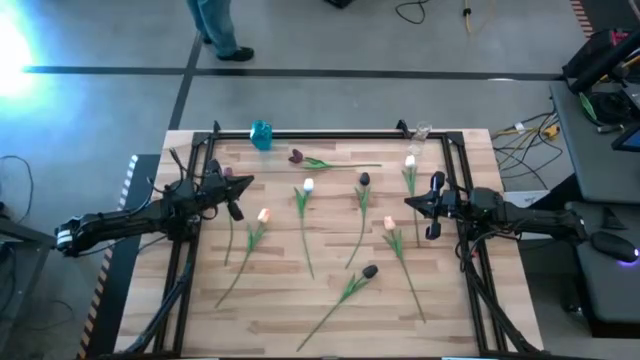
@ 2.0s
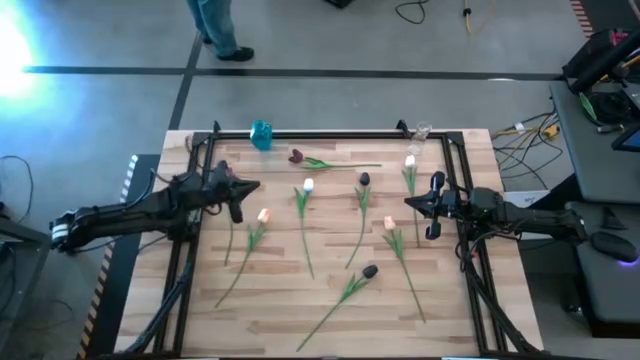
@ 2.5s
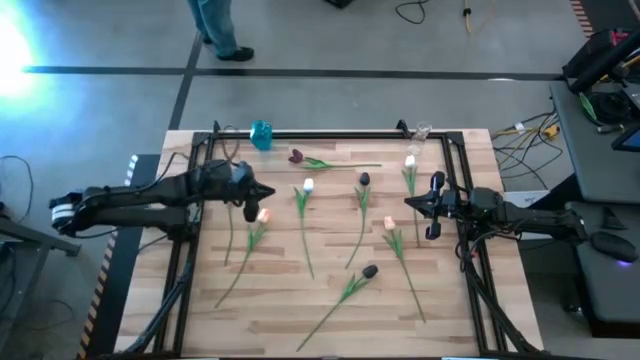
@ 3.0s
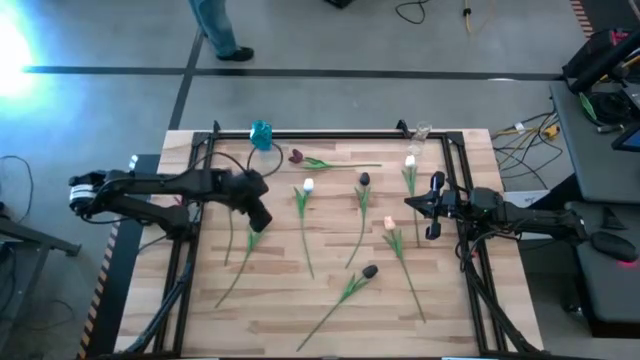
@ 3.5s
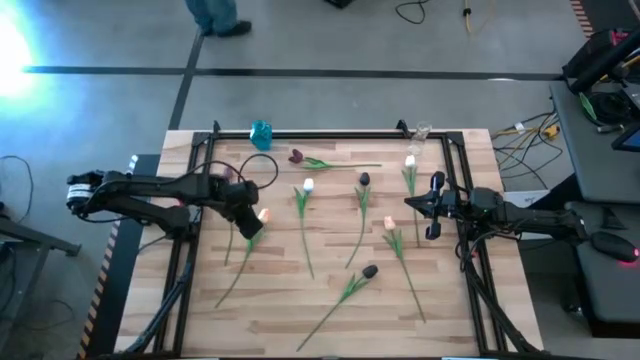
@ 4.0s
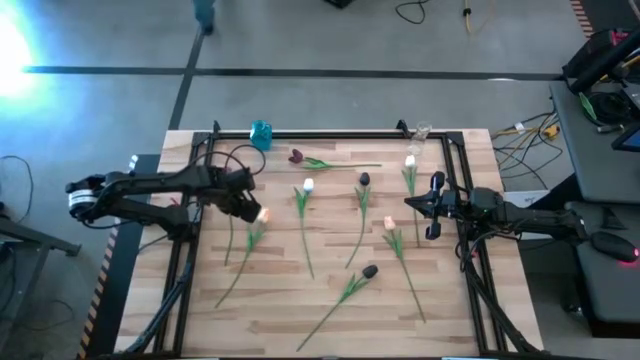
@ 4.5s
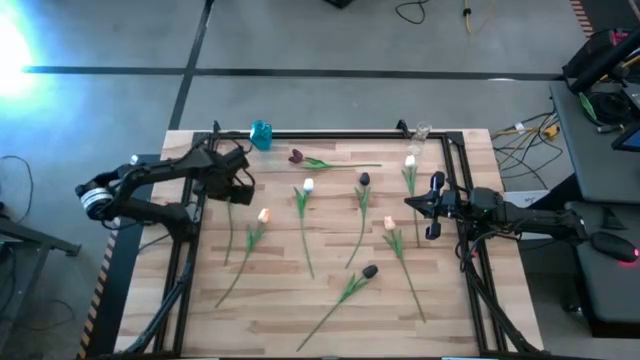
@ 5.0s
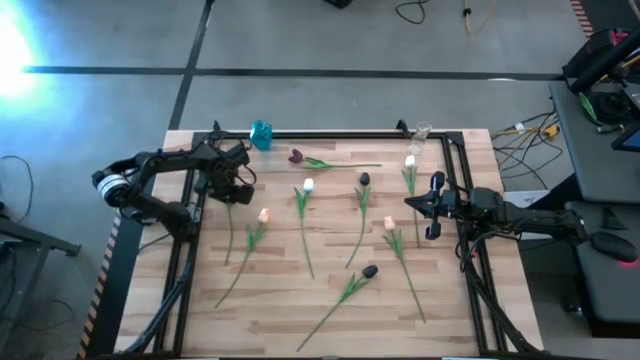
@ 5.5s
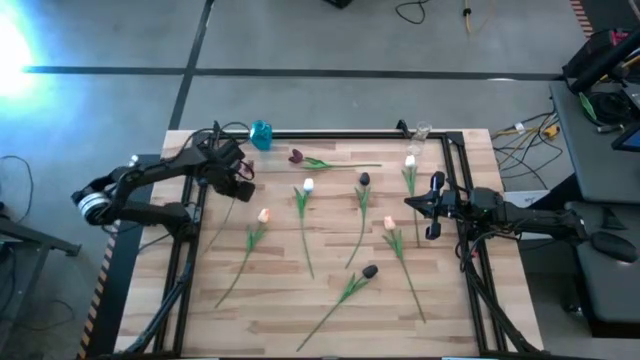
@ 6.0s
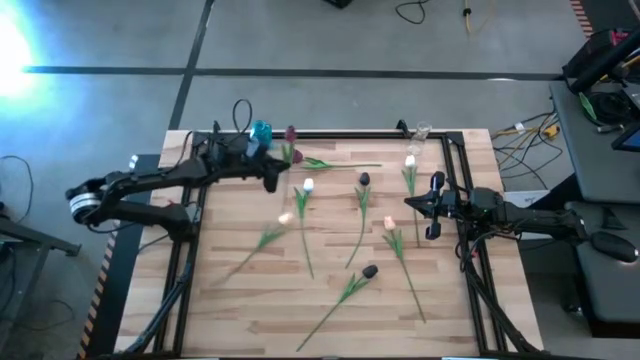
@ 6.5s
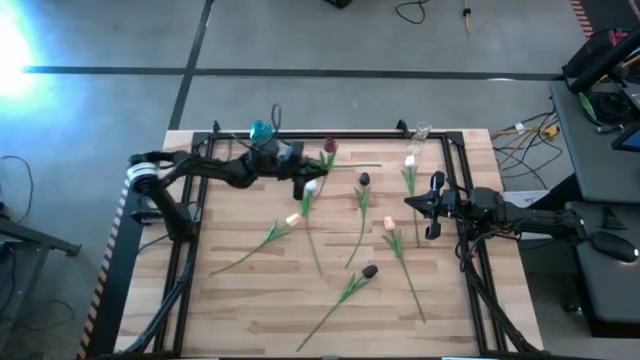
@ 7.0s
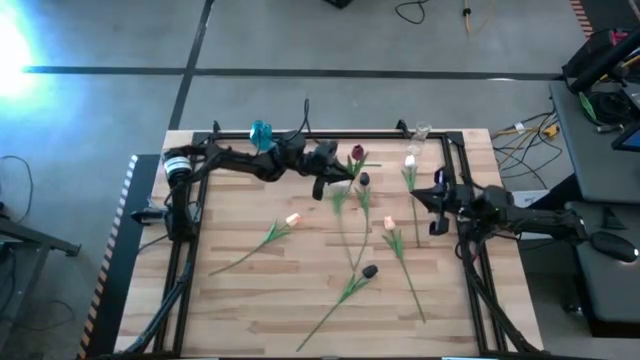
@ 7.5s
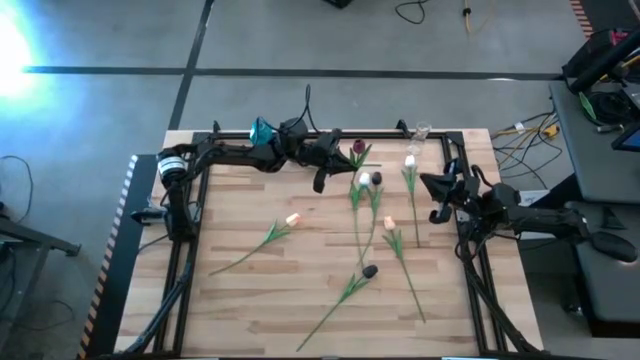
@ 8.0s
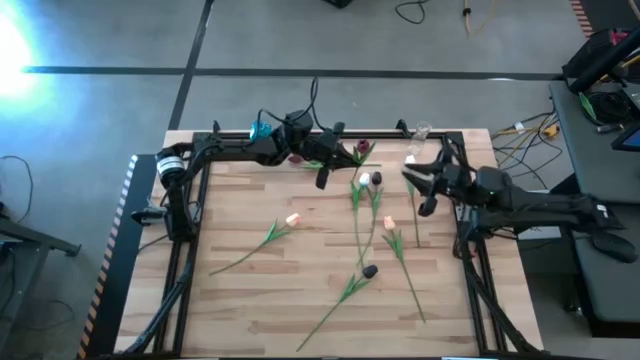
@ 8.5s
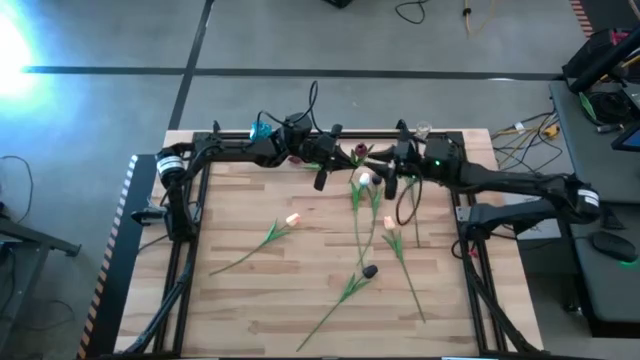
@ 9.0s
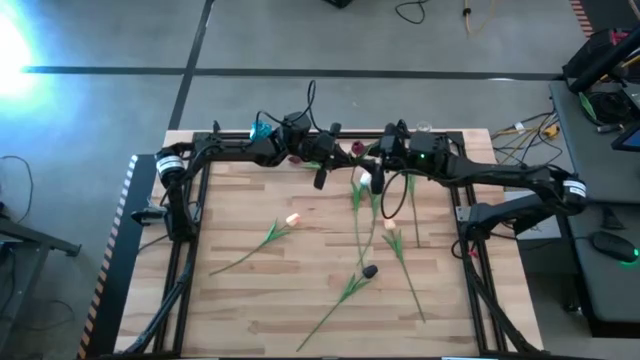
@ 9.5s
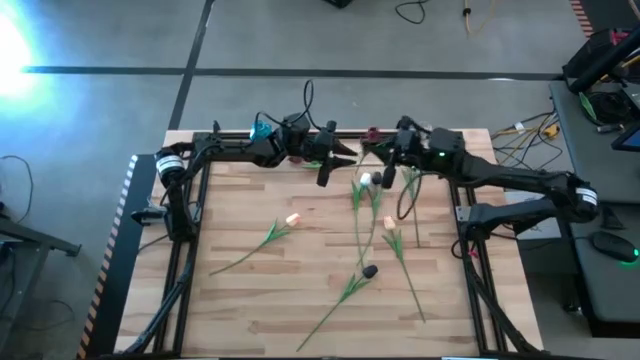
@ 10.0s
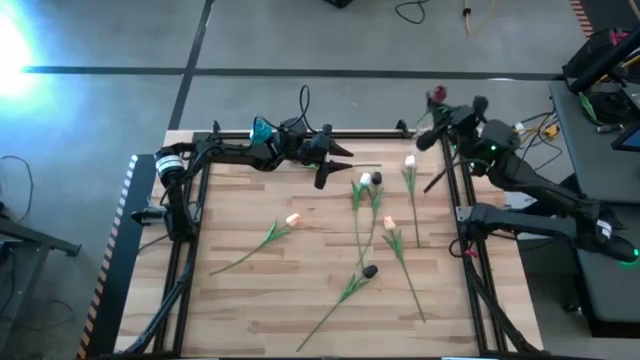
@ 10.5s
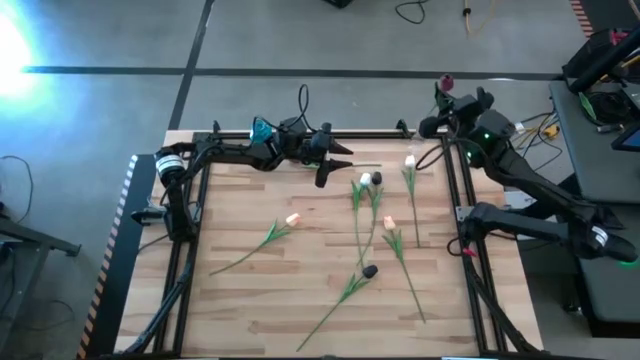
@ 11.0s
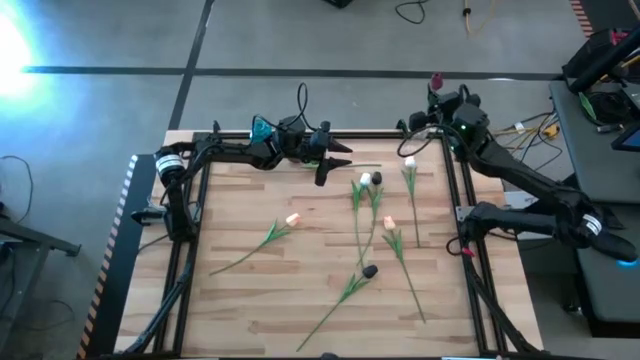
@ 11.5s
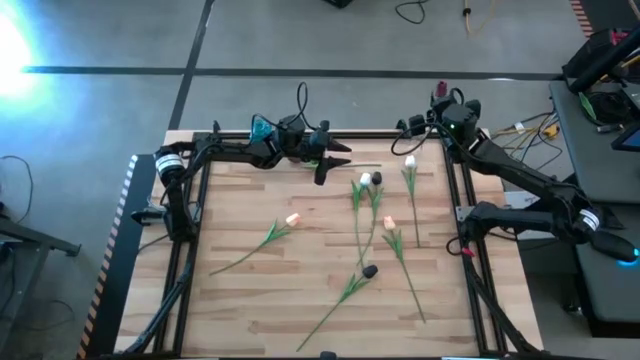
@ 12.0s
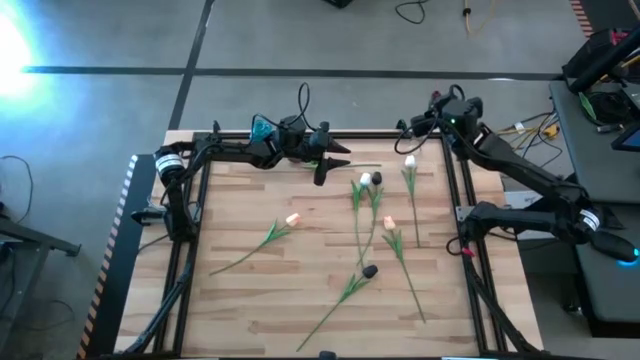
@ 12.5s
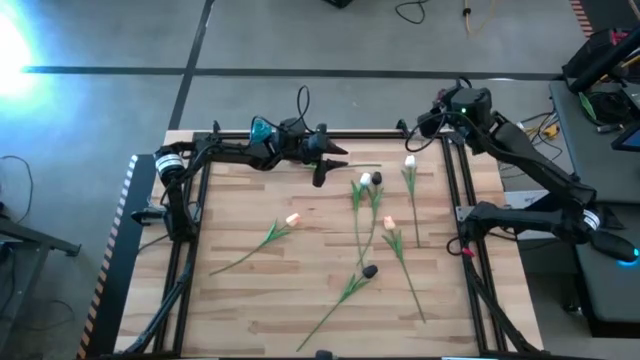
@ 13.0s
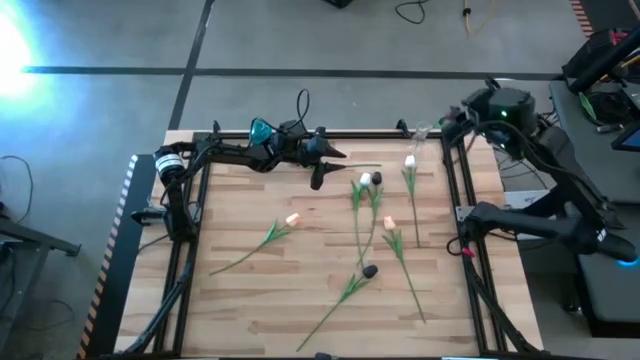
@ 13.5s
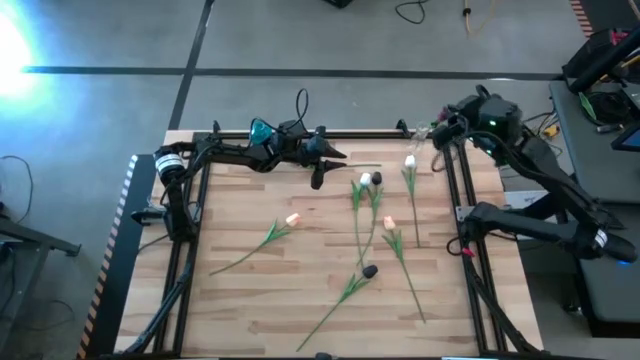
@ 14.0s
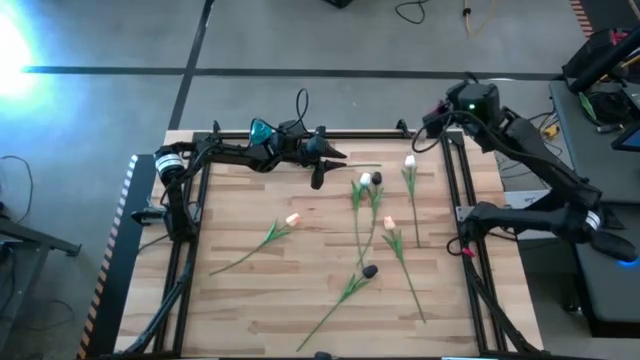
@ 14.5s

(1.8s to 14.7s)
Task: Sort flowers into vase by color
Put the bottom dark red flower into the transparent vase

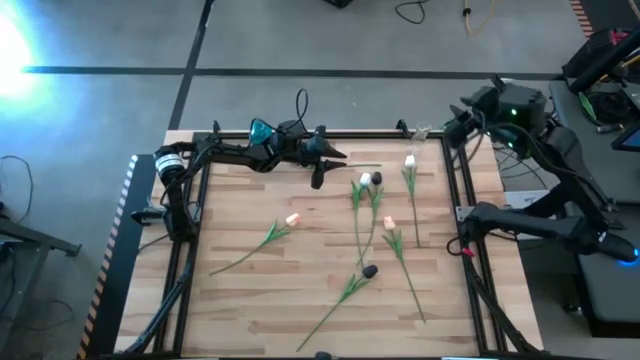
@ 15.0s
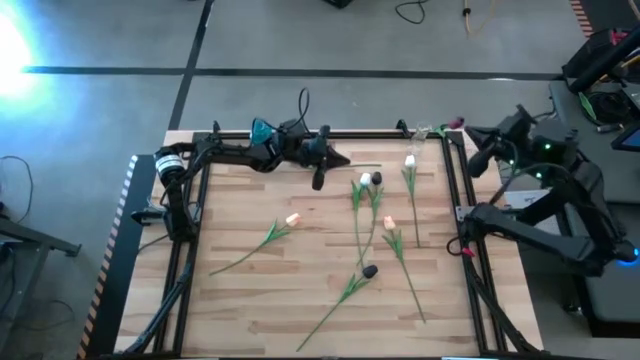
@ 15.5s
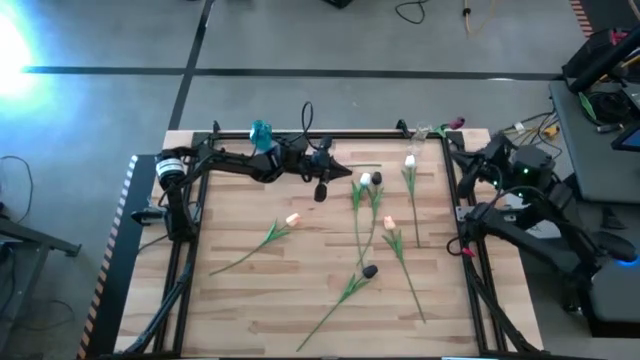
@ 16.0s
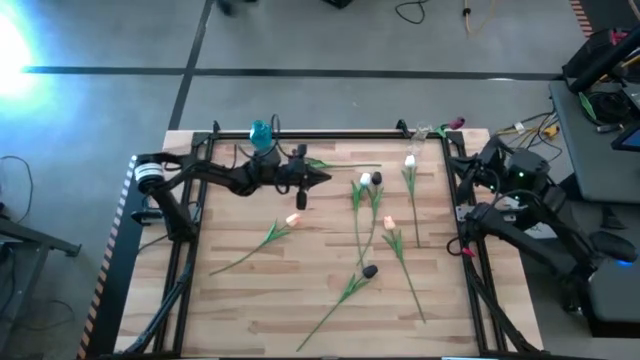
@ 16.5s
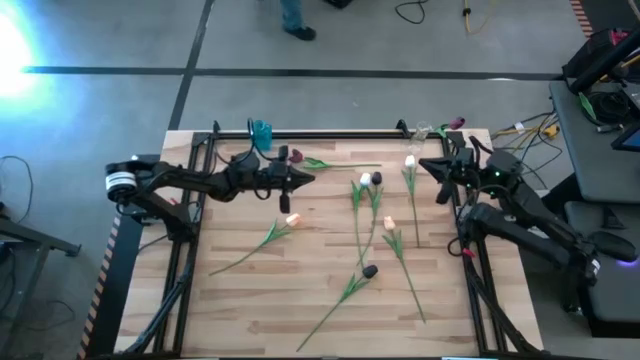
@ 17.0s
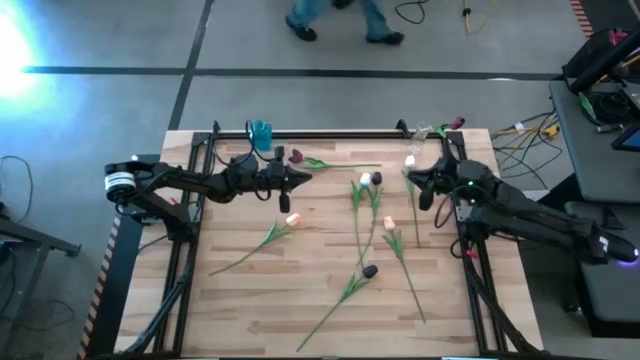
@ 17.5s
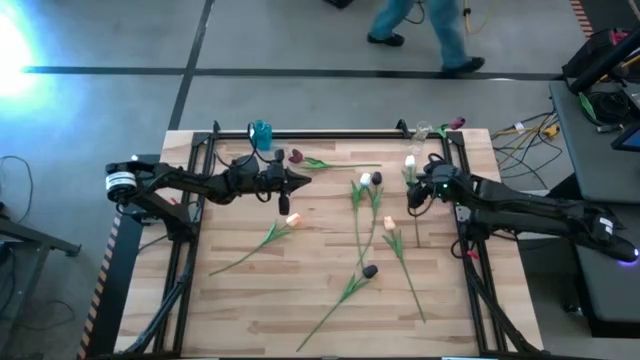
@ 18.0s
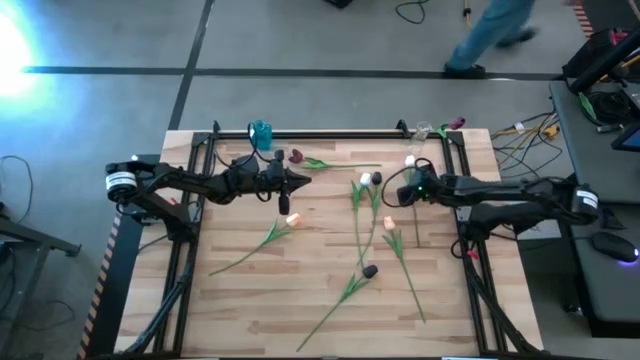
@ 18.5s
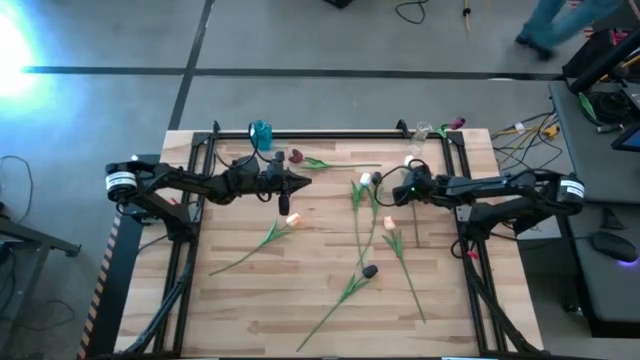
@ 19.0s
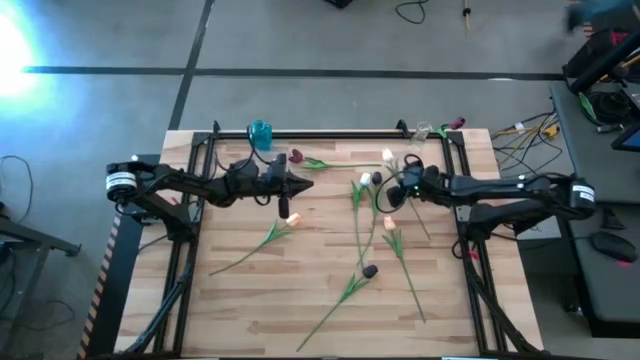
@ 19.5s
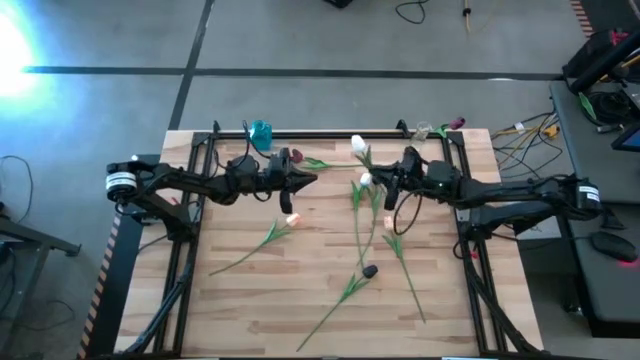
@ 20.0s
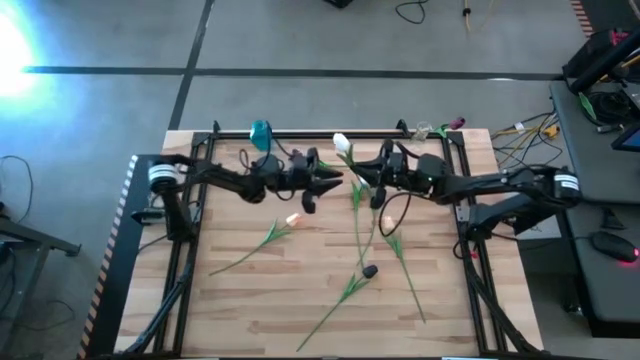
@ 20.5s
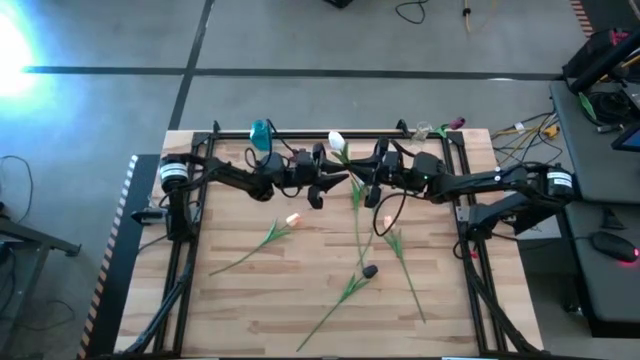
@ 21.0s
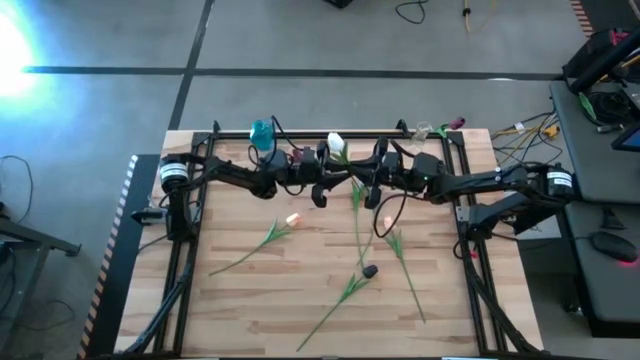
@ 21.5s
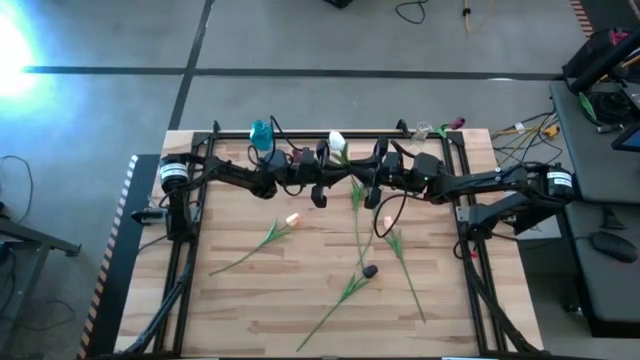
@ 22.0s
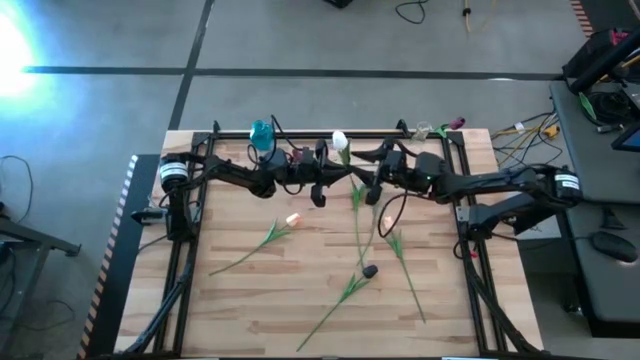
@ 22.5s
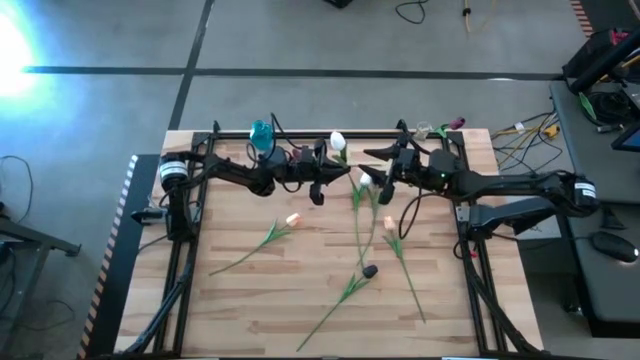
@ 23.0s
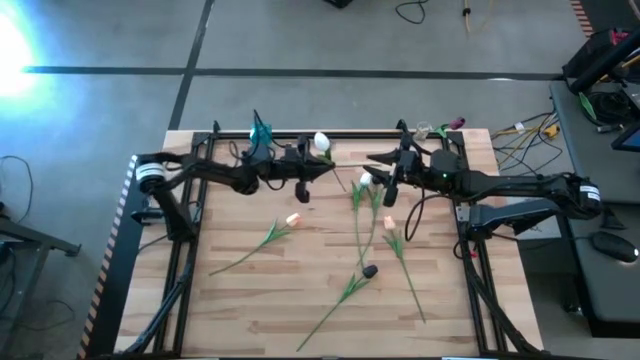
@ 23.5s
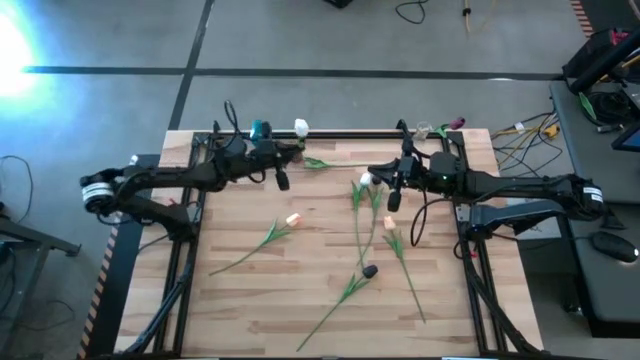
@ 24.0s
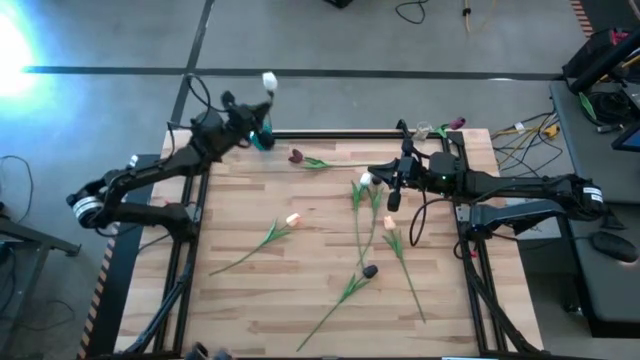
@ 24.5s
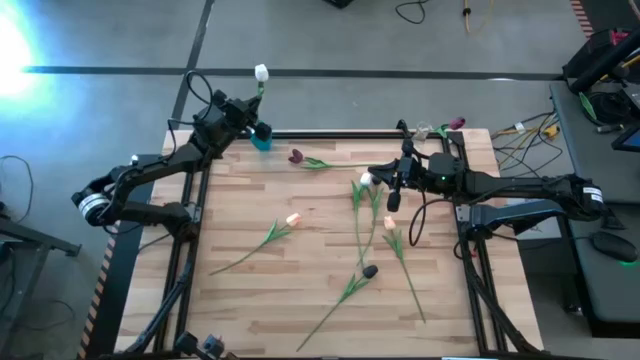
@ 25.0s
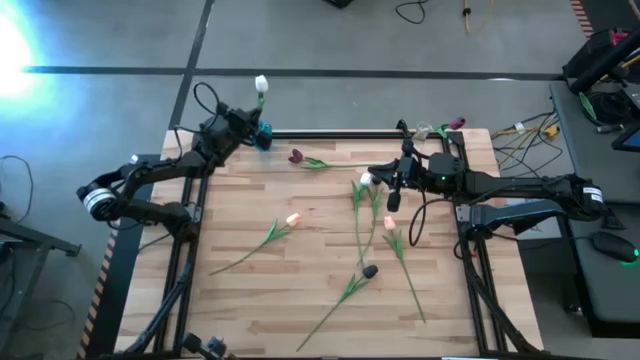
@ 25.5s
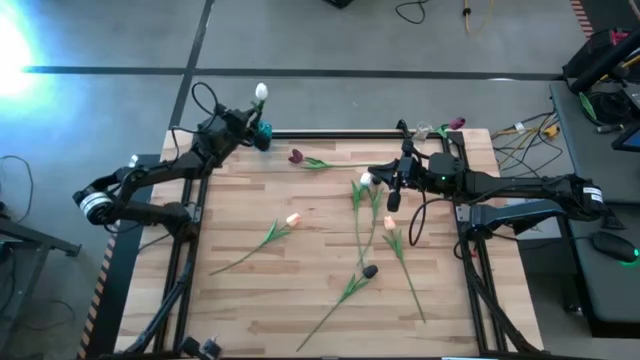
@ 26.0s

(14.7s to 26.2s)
Put the right white flower into the blue vase
